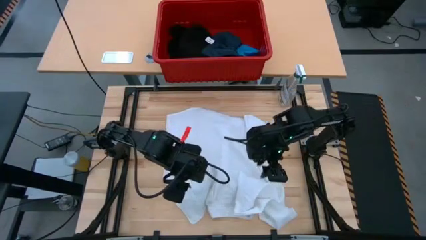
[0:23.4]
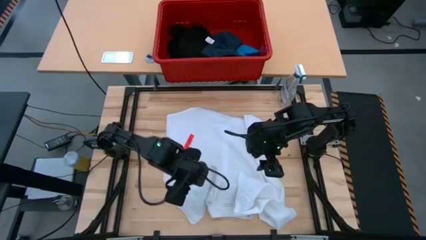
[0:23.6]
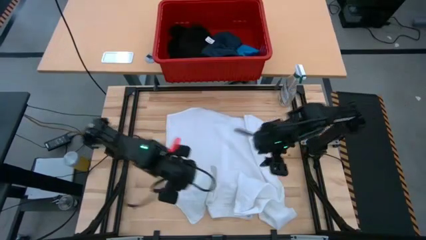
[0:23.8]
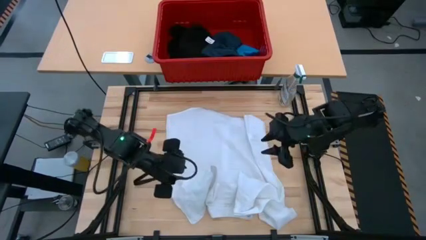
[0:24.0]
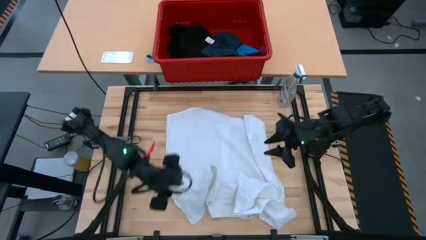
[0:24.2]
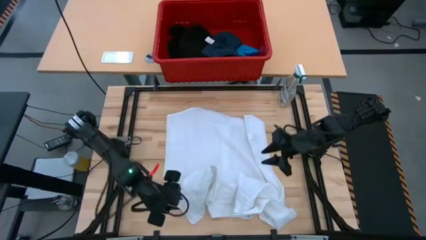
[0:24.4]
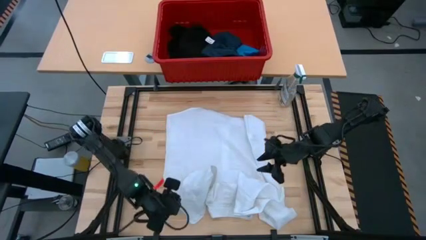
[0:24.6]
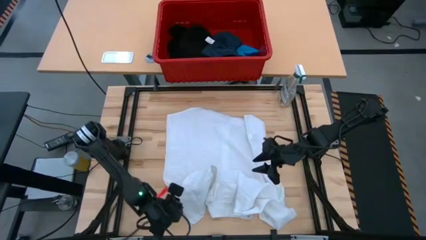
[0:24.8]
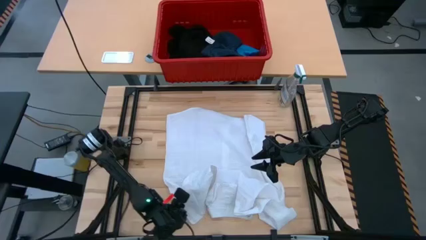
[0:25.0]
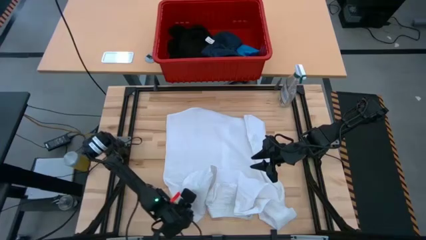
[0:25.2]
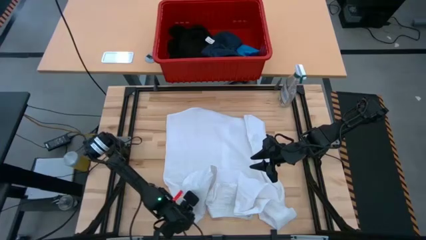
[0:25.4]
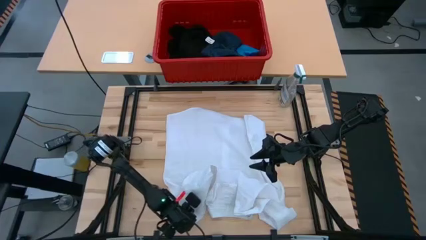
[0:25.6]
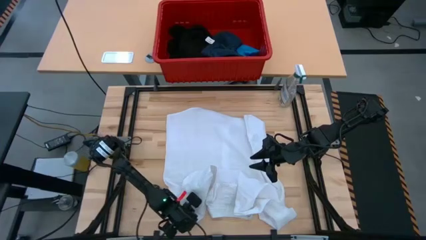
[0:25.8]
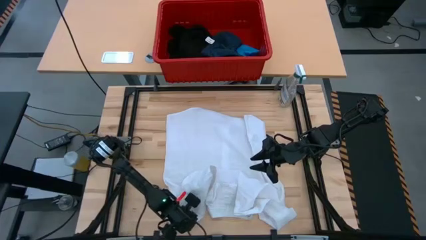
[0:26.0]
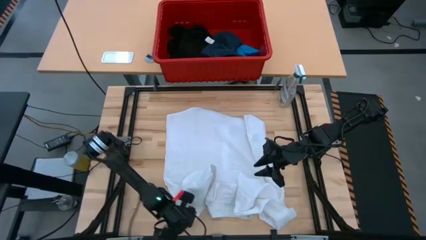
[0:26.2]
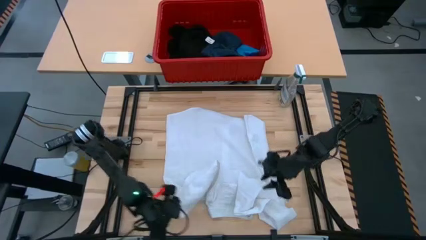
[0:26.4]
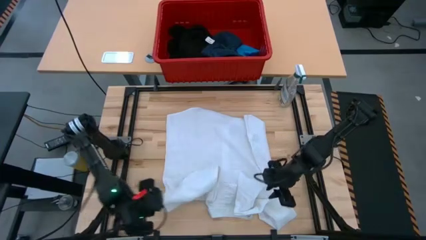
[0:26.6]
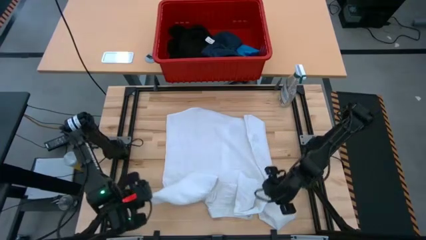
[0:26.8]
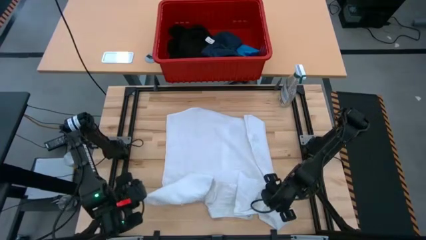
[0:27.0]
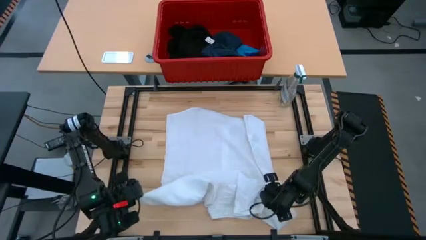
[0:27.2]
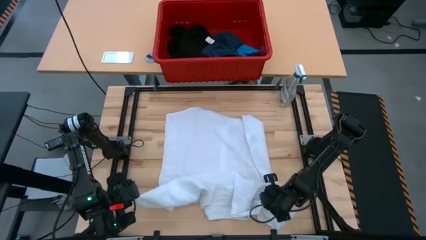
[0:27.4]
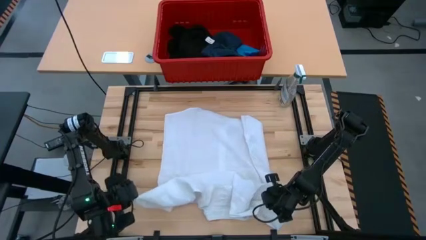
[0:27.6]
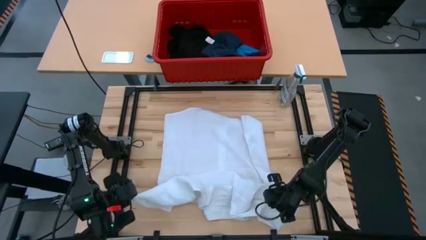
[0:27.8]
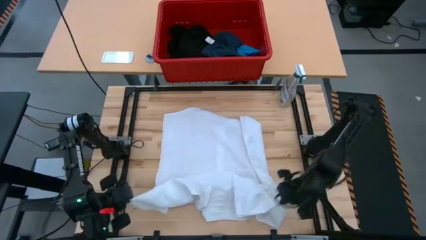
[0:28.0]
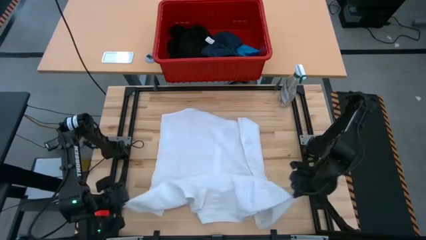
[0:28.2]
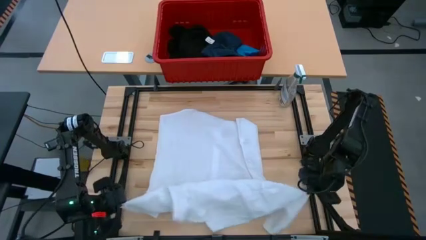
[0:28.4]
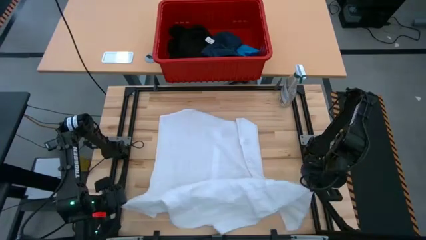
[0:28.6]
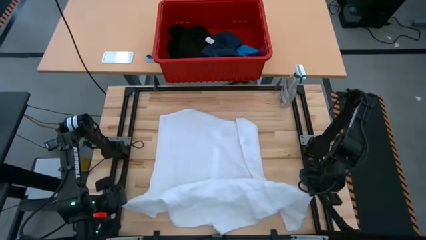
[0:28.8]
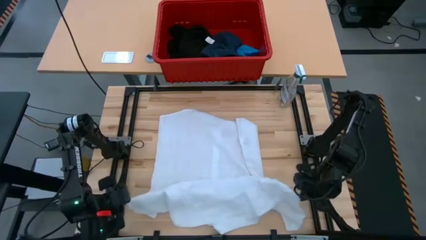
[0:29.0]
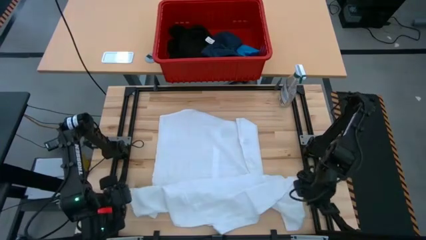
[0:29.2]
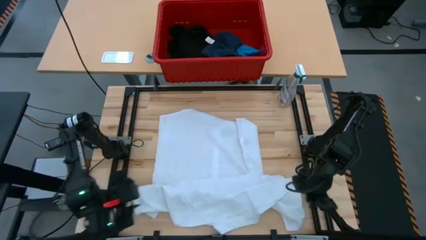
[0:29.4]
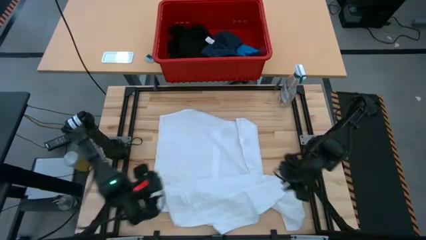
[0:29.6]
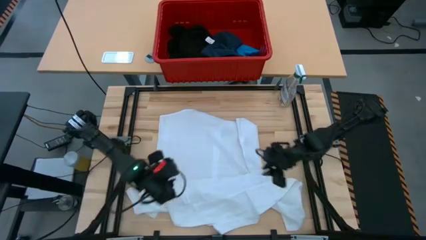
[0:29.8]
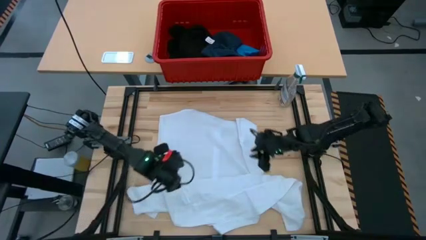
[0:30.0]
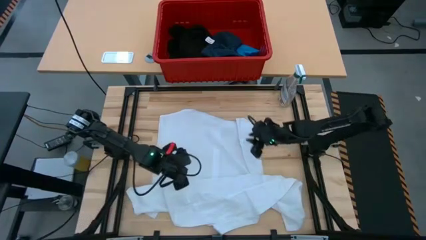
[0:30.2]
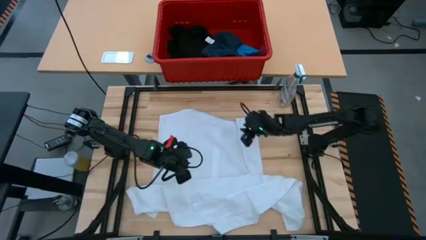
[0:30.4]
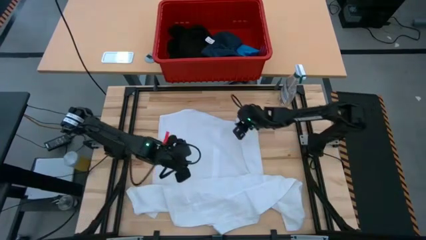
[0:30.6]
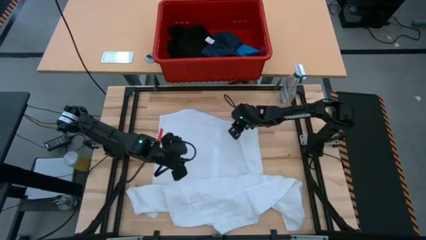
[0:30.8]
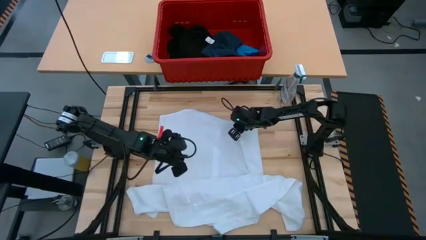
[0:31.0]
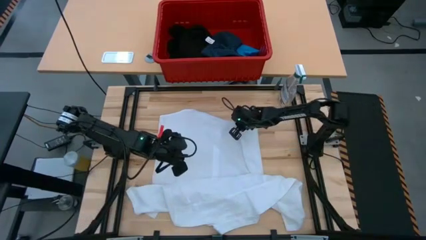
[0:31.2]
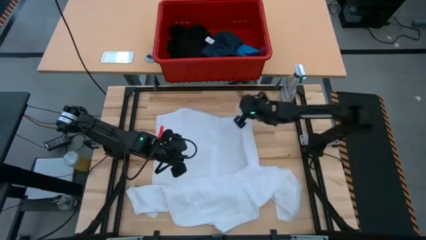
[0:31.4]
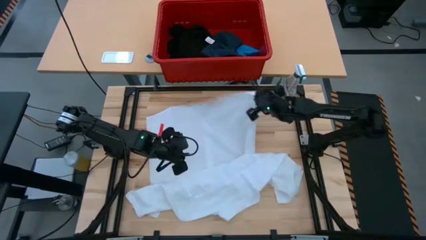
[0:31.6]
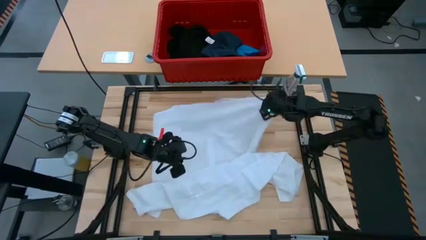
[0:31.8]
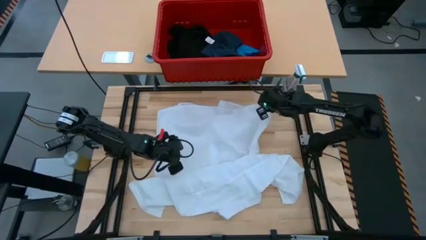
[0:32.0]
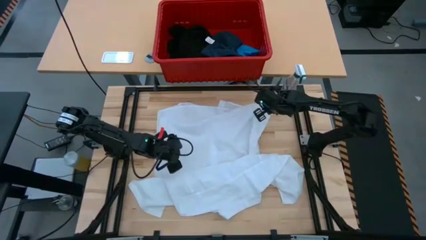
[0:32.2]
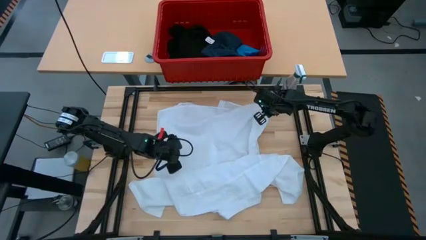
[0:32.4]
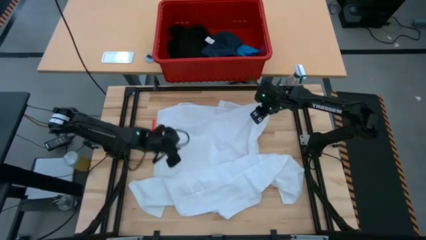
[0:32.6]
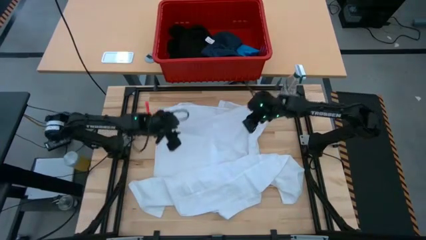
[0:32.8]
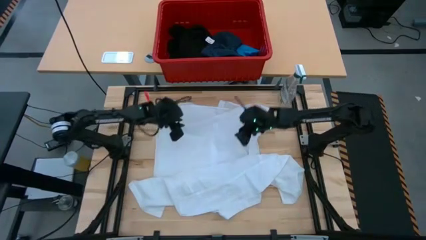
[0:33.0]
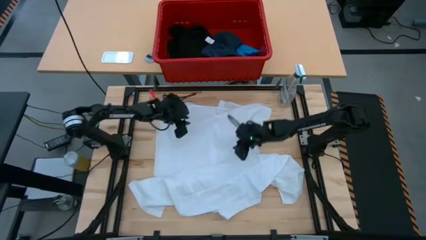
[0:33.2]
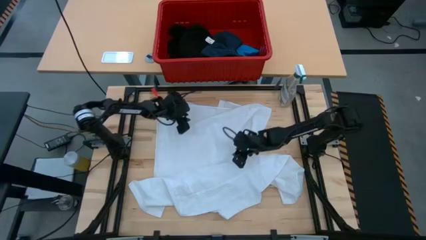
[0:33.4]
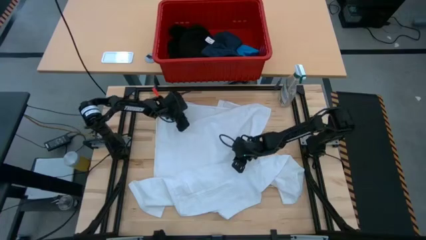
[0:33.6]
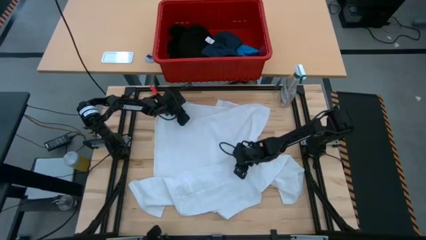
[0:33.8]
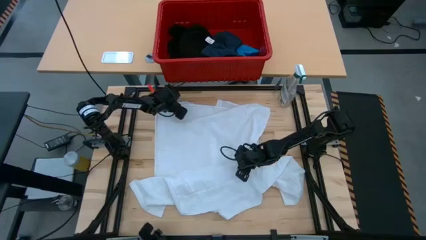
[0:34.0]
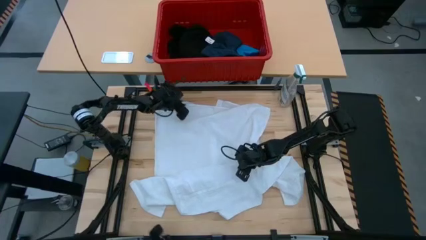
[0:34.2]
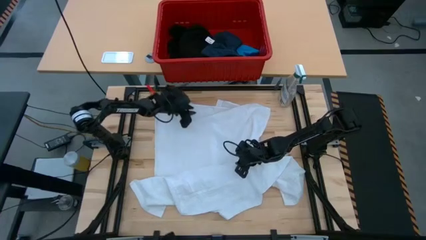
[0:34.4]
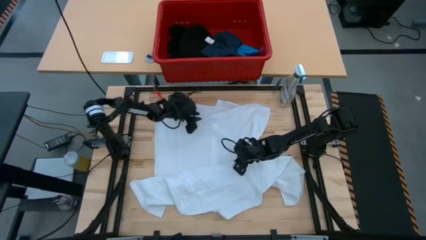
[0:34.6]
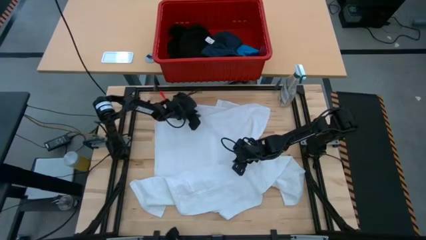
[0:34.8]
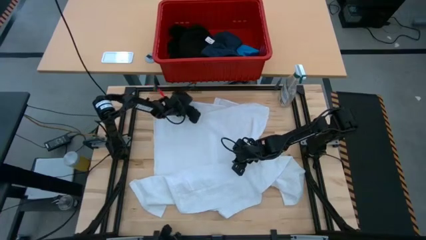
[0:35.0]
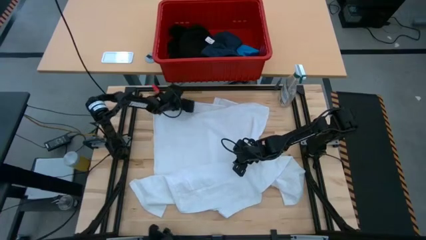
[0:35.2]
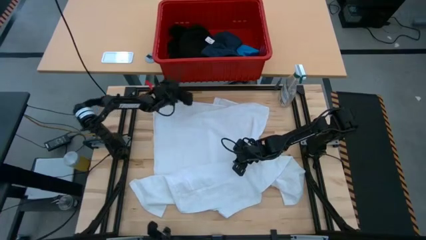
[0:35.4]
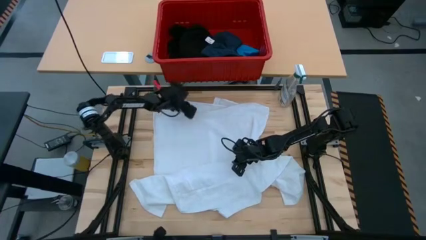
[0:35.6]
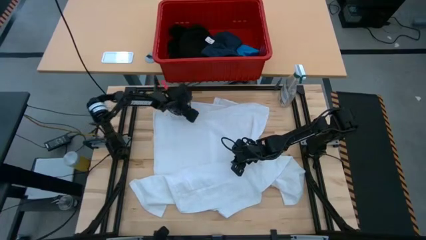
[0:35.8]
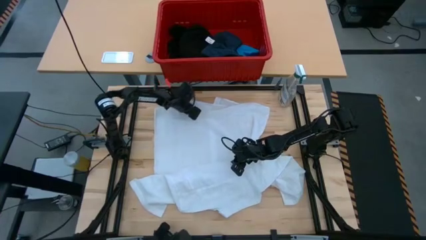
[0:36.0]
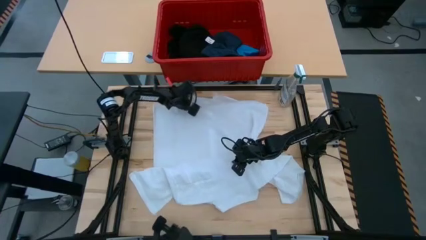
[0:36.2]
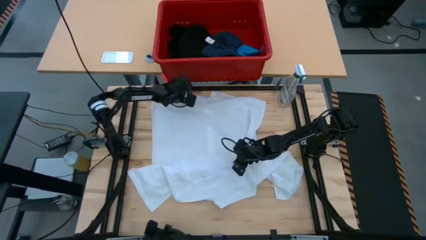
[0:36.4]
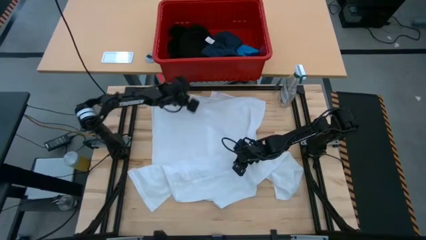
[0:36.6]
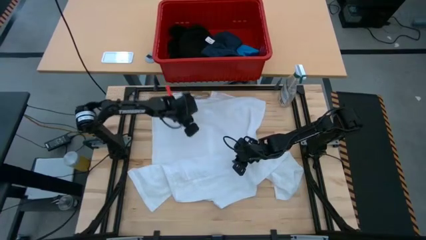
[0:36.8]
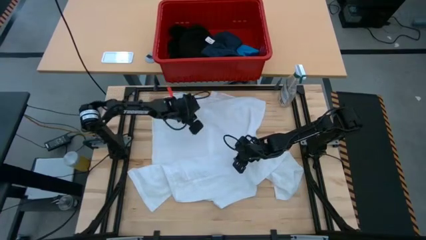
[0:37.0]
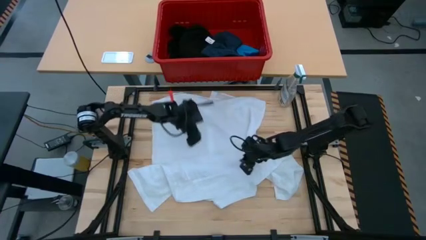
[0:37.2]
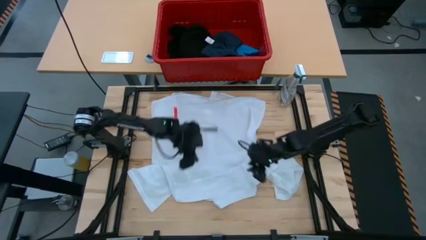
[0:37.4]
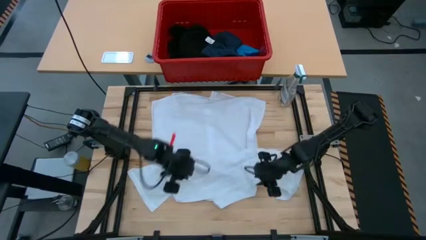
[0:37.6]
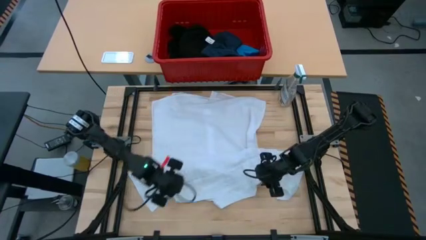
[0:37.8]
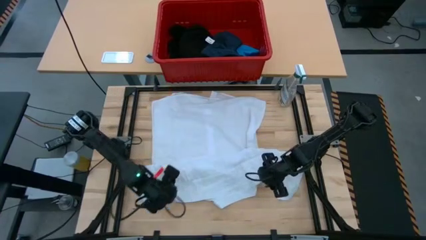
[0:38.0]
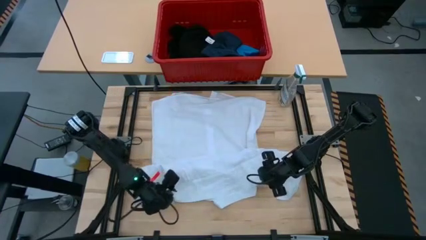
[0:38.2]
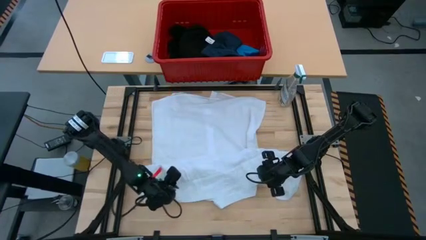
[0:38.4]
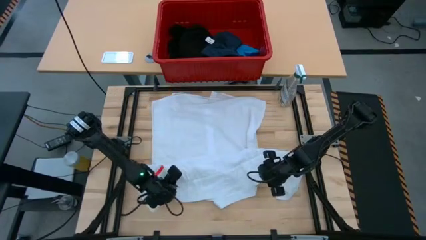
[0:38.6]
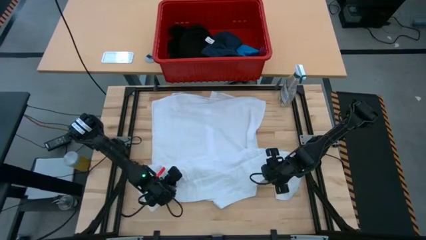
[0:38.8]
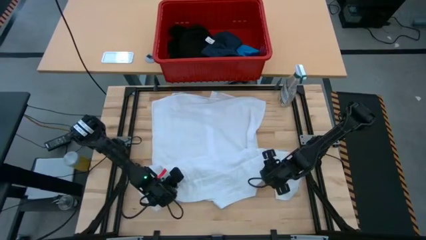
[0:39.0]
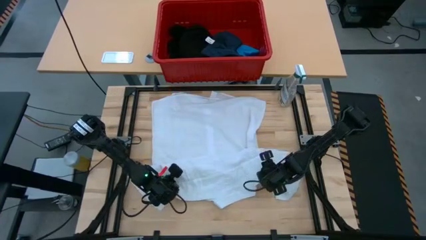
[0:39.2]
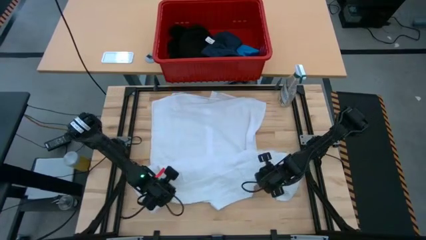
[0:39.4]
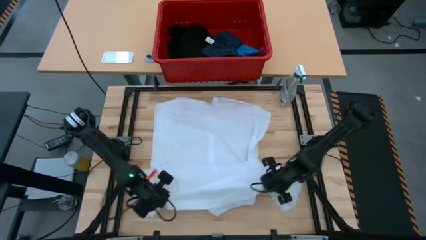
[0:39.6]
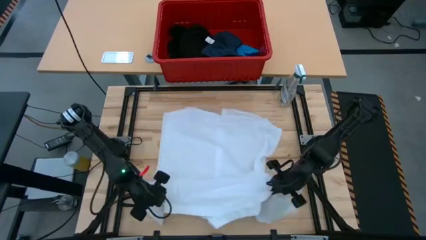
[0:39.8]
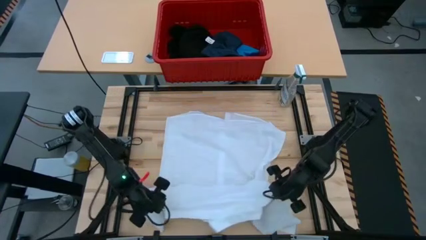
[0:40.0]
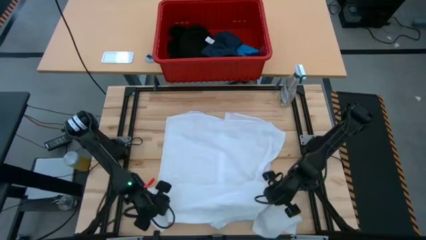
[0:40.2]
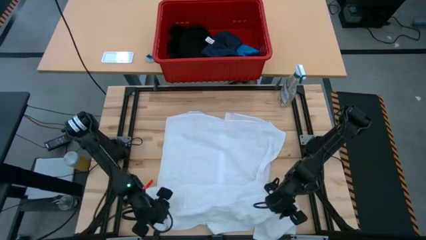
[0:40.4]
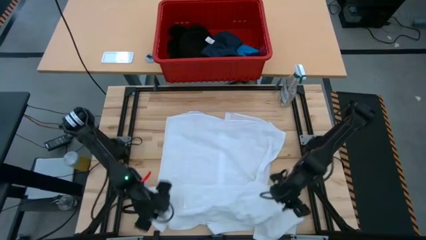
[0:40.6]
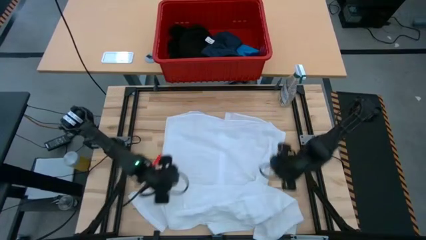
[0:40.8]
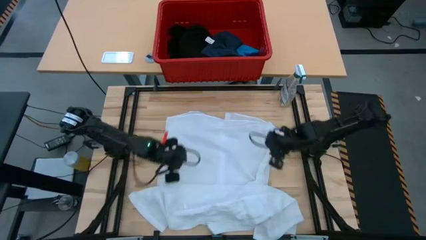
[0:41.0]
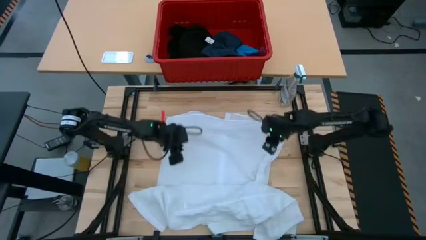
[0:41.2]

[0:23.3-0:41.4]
Task: Fold Laundry from Bin
Fold the white polo shirt
